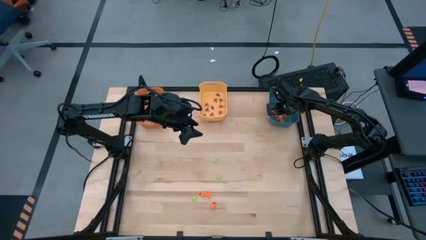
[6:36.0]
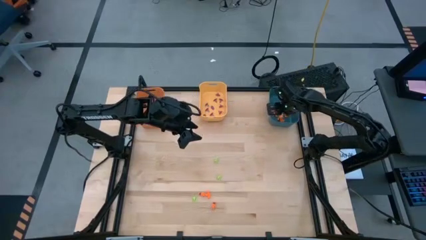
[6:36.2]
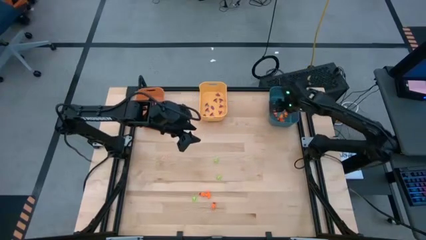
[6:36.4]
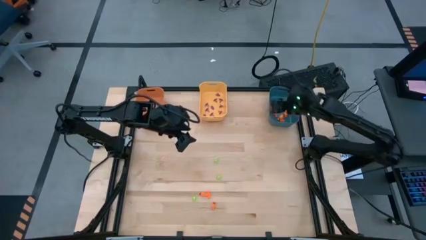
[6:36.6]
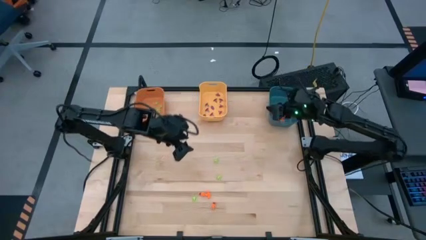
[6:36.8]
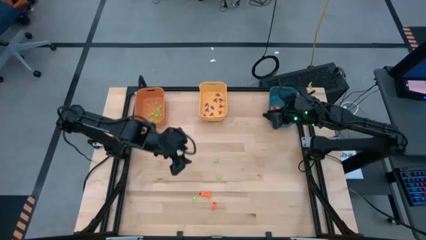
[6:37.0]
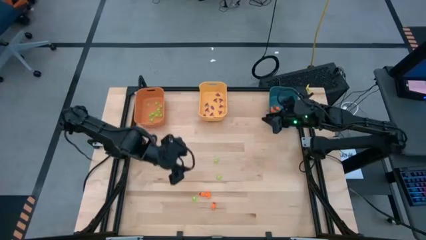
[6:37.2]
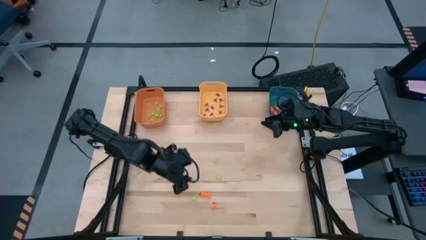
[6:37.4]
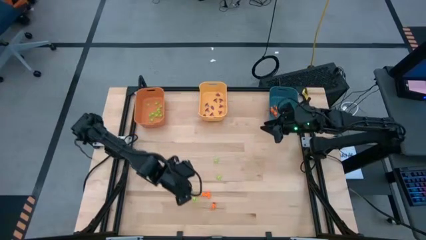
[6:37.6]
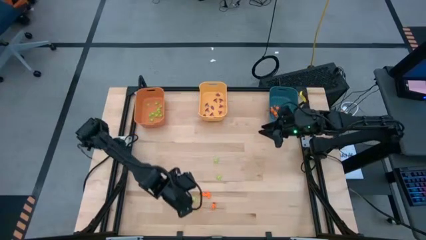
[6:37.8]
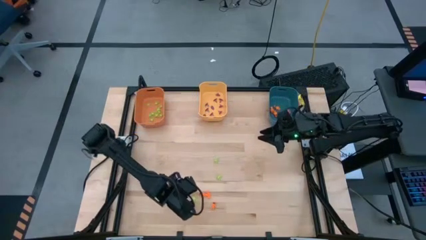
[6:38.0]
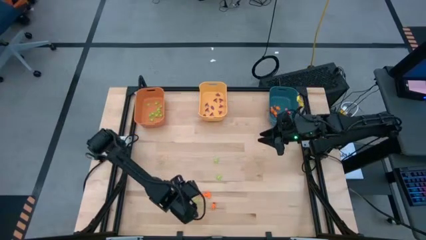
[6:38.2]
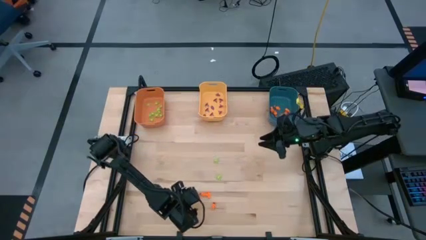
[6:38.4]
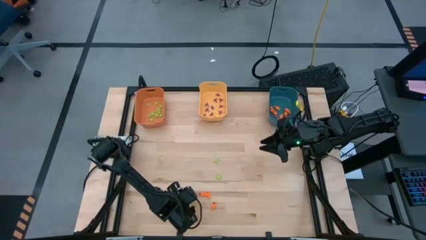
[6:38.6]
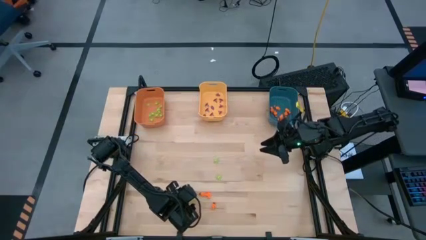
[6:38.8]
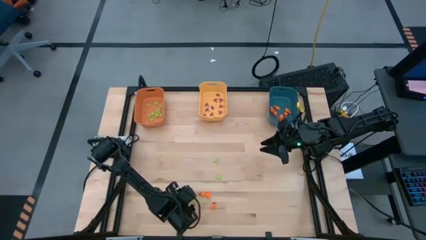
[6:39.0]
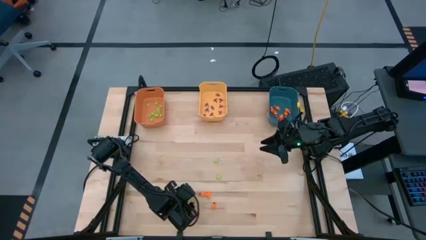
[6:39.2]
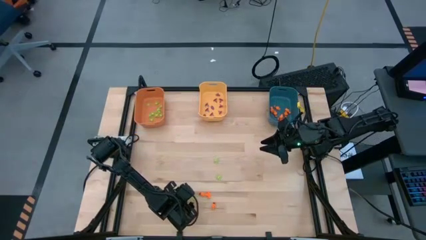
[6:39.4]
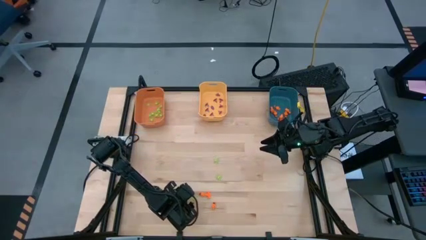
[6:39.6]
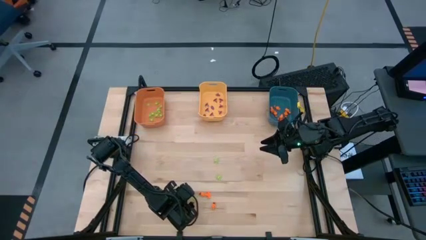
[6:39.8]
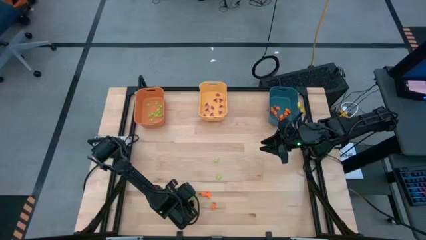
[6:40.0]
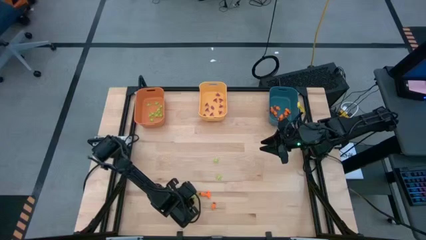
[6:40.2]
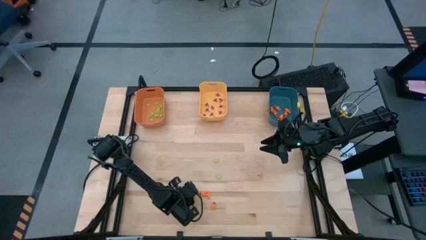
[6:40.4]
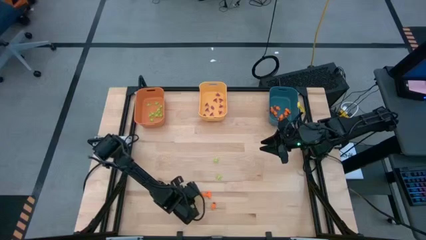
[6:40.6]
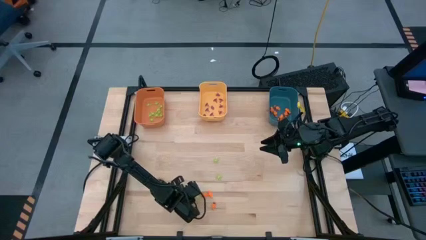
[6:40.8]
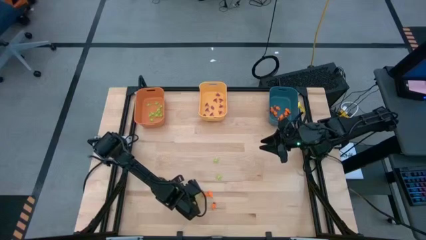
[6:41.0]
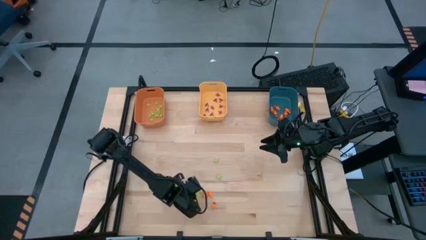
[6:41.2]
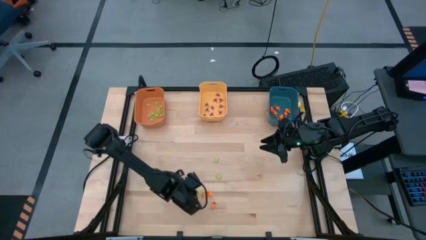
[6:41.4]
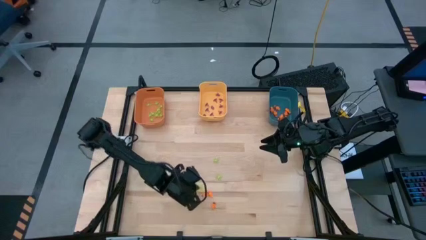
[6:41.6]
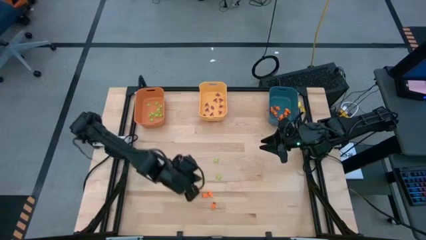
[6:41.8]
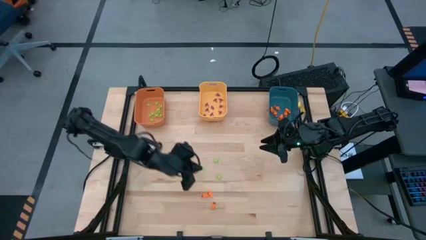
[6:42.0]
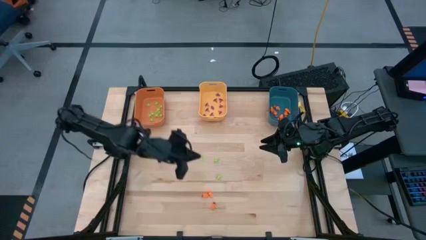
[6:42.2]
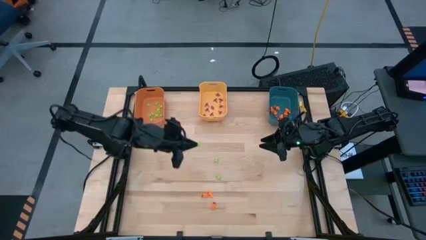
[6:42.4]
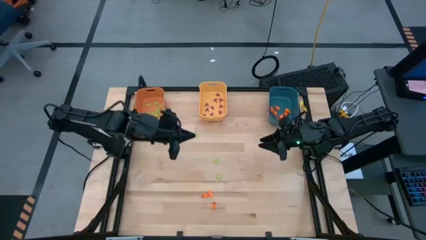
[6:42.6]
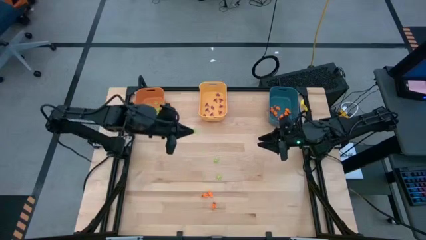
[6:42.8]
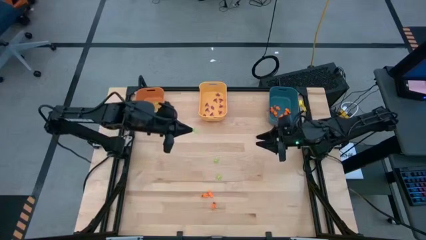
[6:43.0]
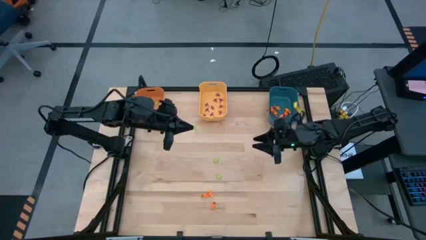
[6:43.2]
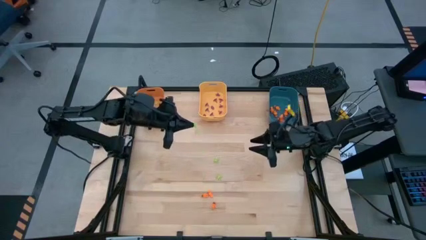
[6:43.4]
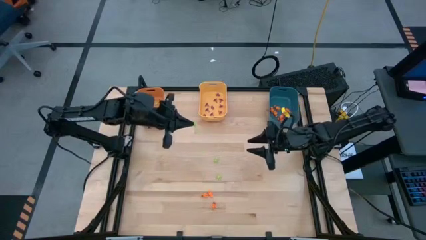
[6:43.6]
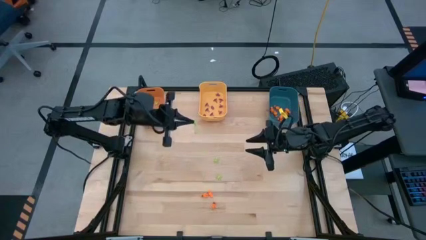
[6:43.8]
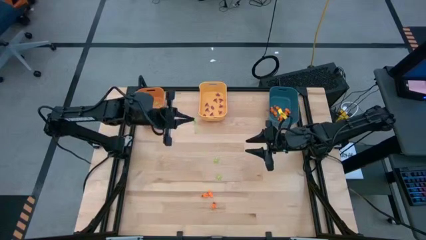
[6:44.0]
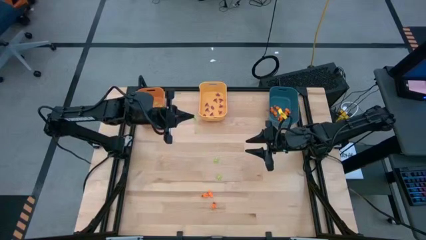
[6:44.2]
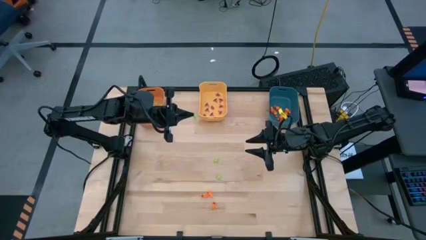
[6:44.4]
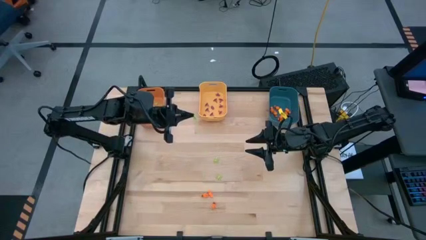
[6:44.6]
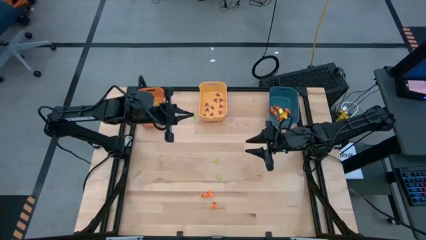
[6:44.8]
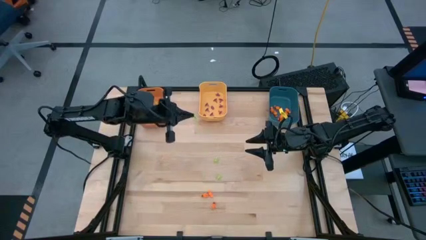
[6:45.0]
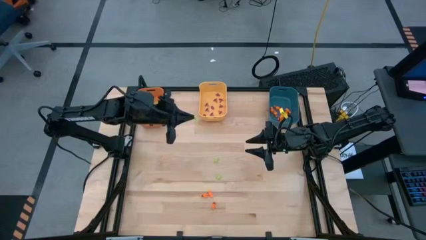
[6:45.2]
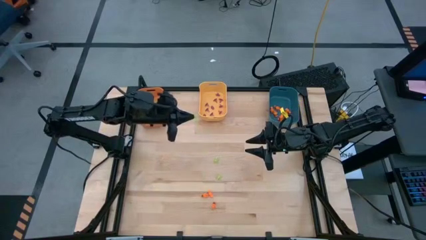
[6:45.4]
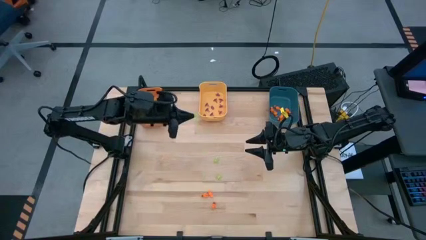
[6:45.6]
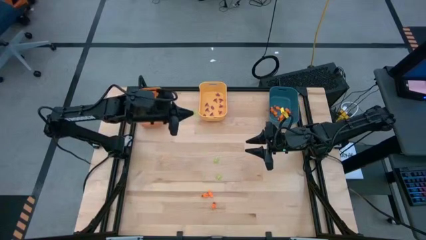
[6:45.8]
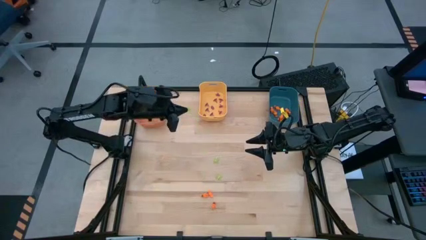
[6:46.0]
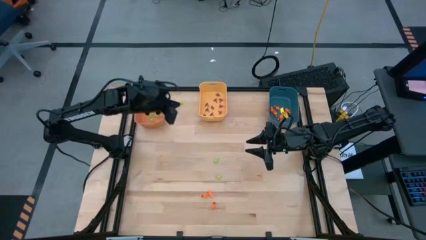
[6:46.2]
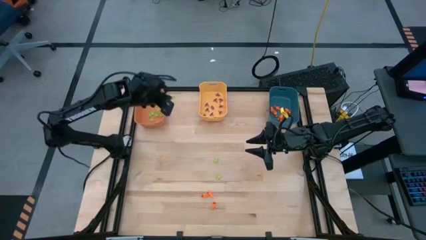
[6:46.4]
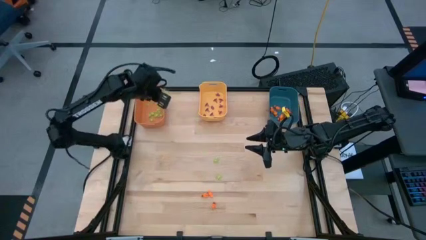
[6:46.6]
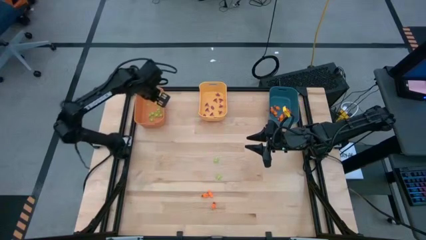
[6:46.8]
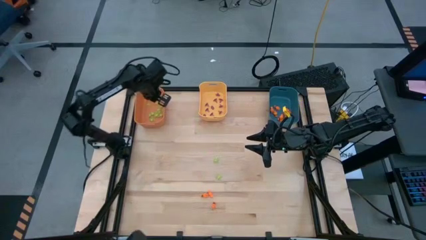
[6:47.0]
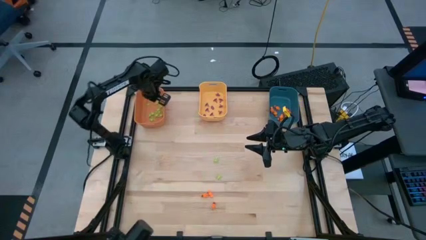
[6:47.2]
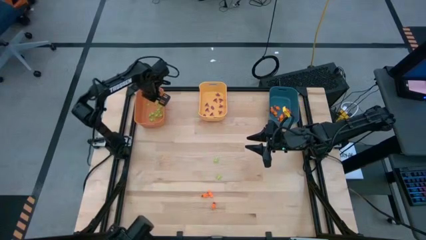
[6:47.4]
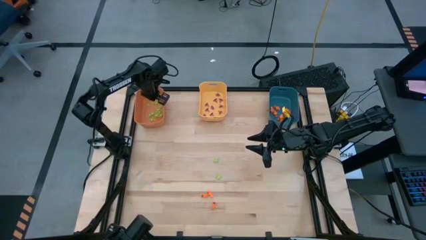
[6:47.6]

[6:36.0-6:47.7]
Task: Sort Halloween decoration
Put the green spider toy into the orange bin

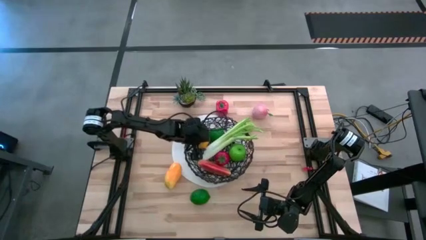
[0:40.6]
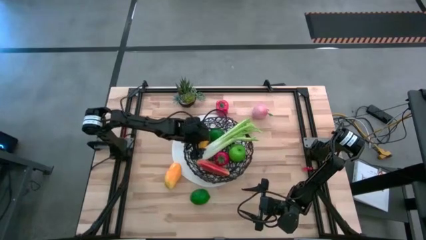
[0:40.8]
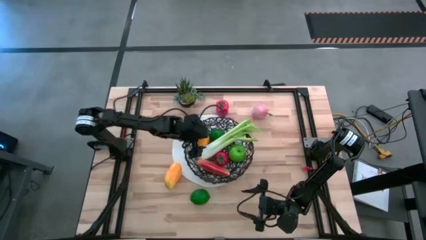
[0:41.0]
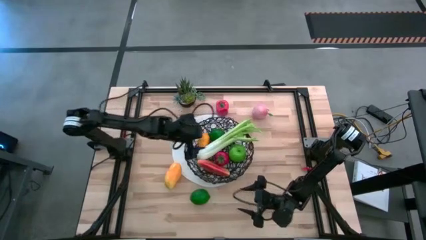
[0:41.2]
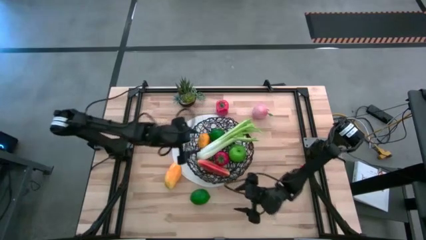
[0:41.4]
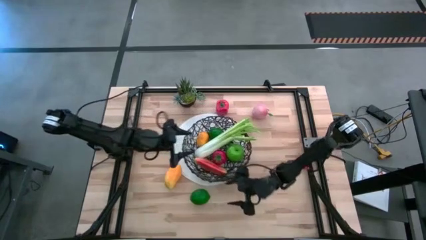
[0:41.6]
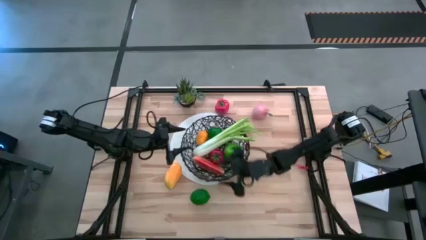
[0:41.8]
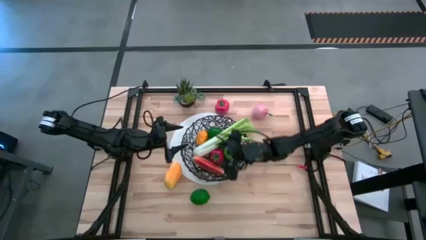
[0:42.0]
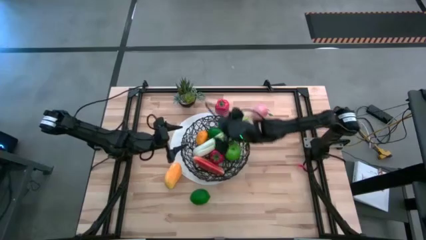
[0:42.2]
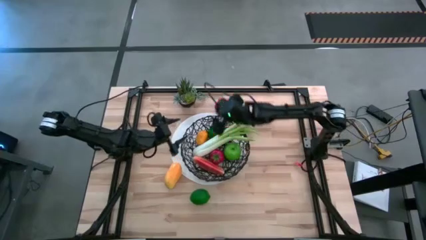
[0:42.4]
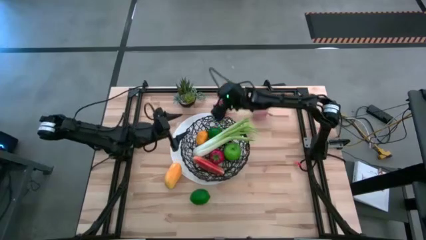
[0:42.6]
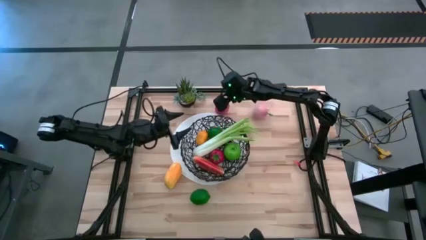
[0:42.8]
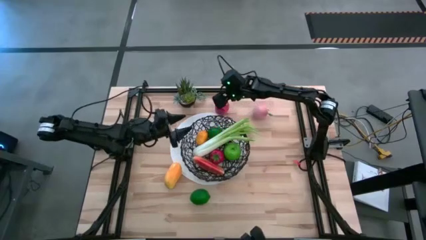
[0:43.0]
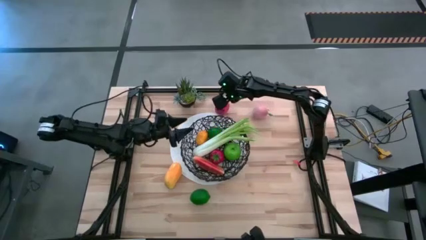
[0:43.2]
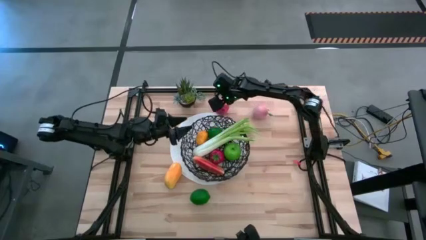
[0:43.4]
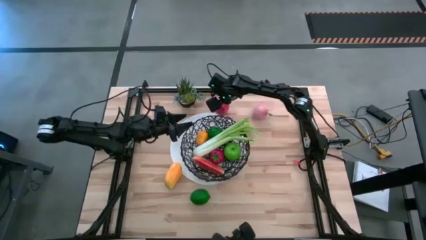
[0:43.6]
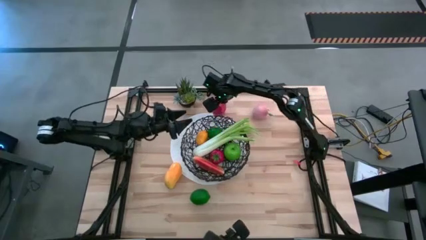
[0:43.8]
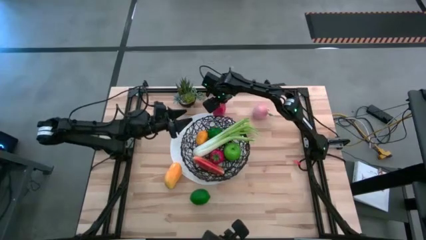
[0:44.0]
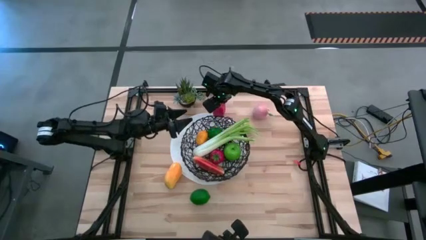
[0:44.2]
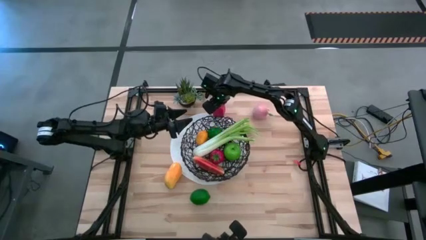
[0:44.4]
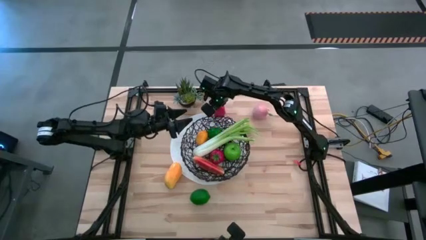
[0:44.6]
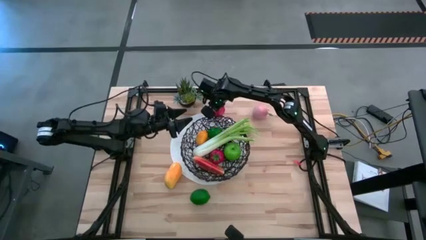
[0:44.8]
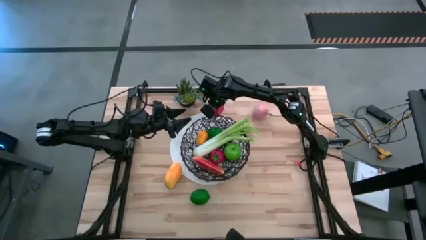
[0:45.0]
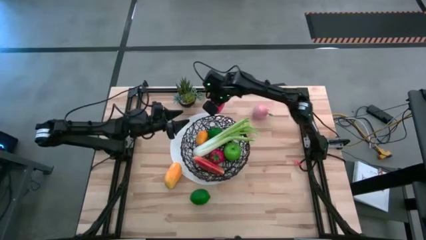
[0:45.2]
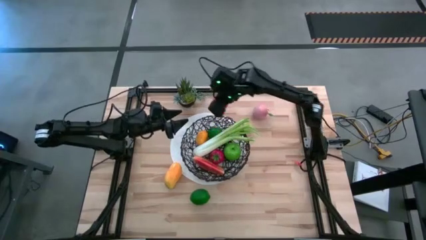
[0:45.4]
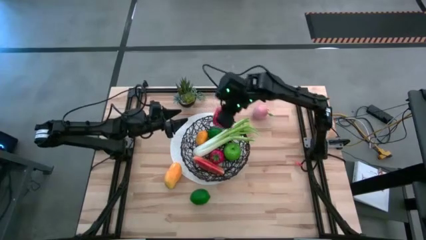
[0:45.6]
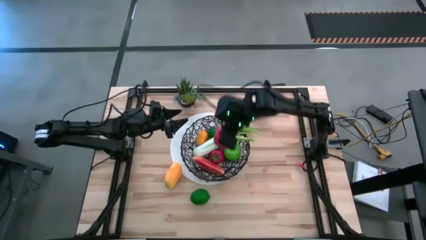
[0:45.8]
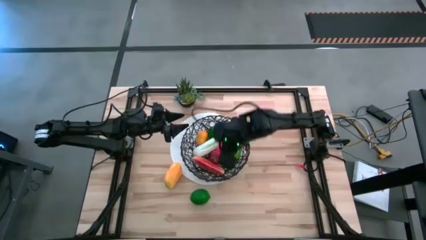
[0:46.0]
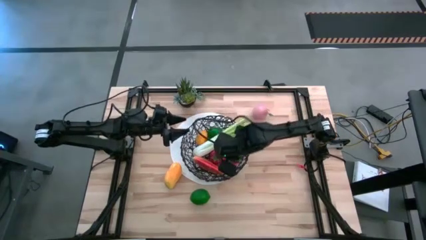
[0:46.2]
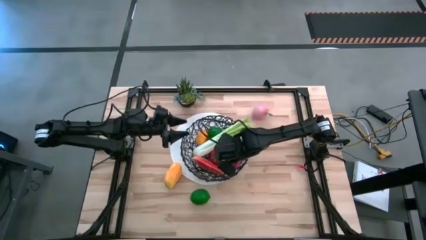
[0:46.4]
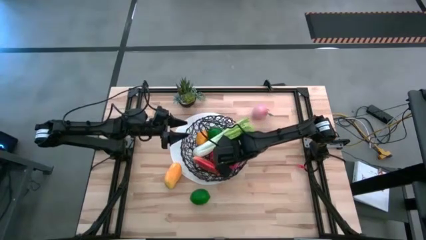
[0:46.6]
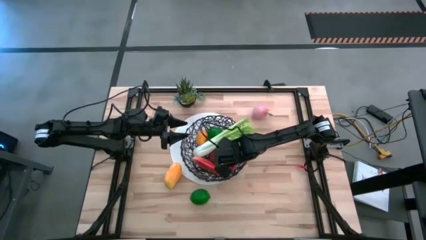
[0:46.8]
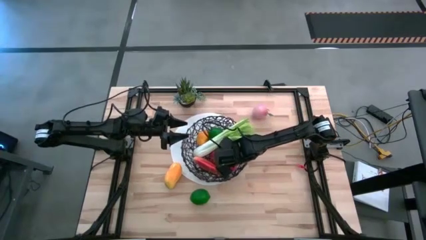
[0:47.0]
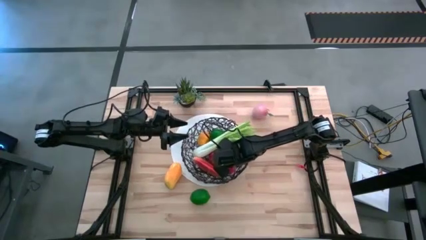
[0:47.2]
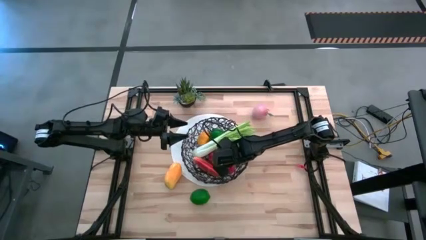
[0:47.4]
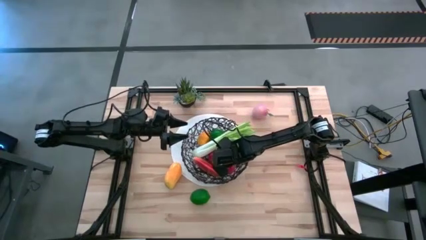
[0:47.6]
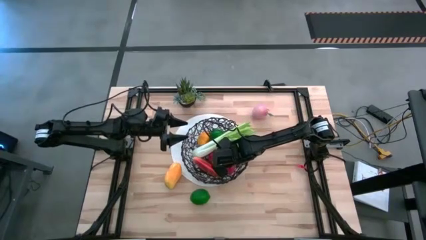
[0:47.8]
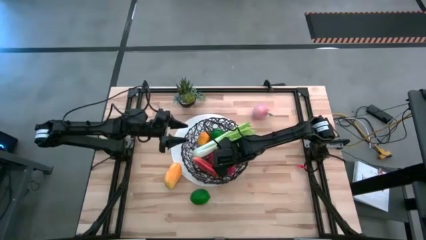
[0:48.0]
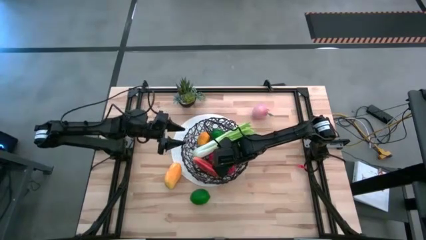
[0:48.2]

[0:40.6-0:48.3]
Task: Build produce basket
Put the red bell pepper into the wire basket
